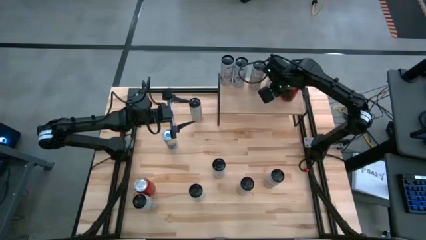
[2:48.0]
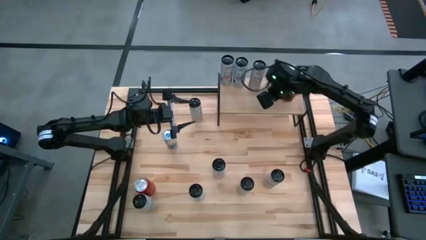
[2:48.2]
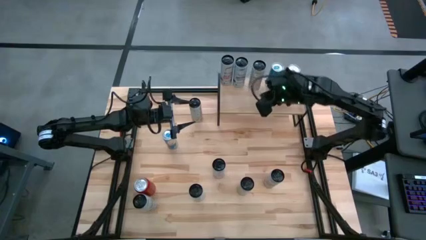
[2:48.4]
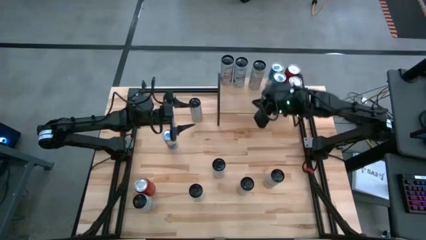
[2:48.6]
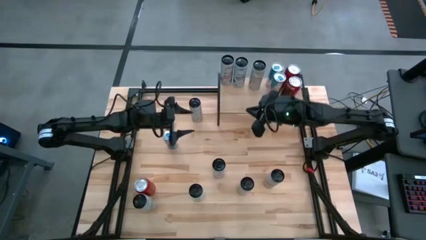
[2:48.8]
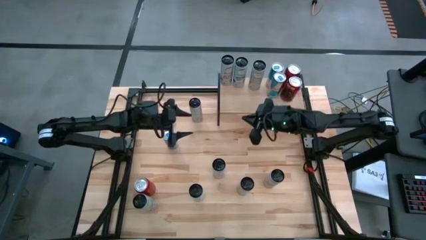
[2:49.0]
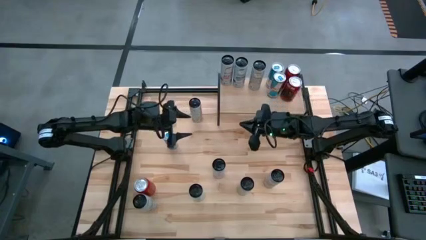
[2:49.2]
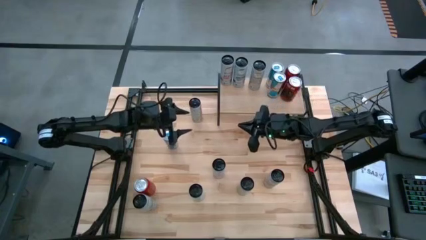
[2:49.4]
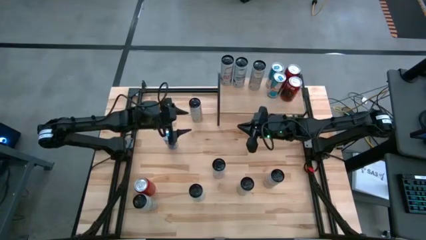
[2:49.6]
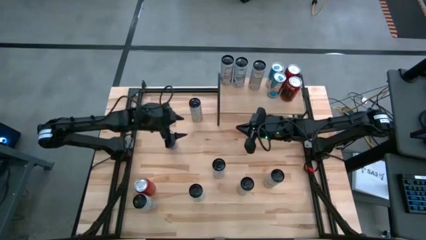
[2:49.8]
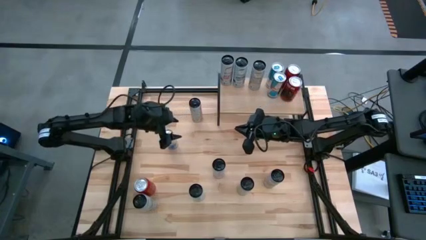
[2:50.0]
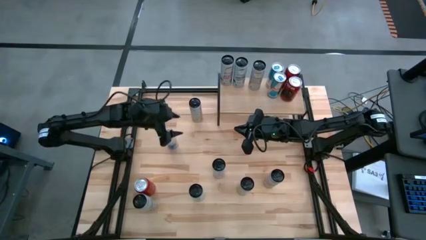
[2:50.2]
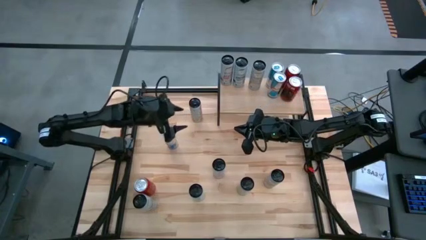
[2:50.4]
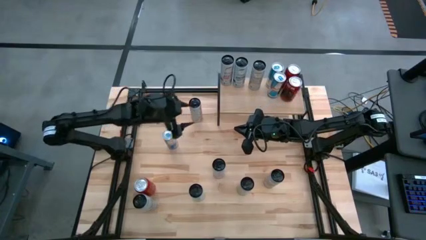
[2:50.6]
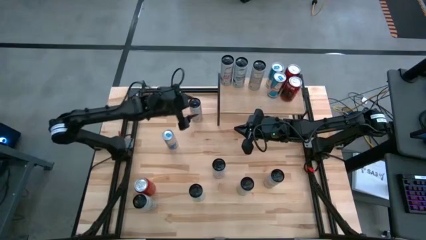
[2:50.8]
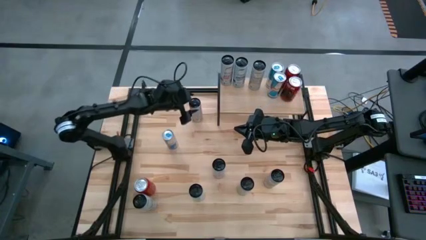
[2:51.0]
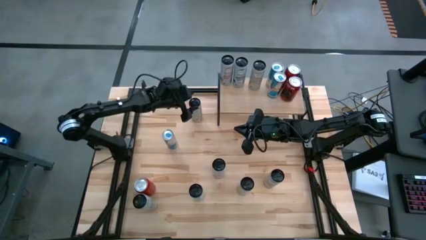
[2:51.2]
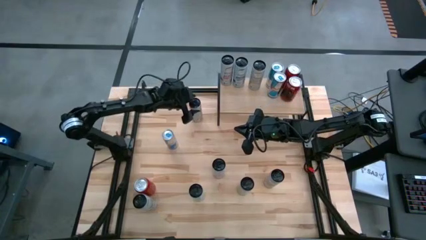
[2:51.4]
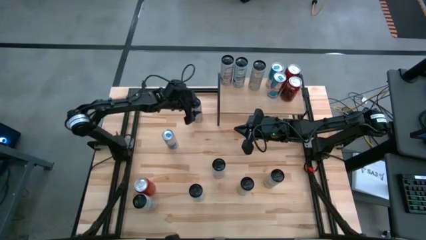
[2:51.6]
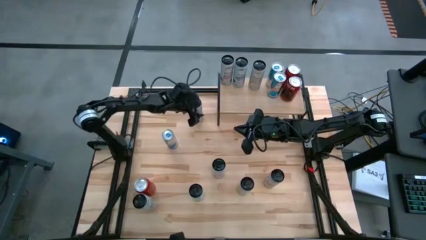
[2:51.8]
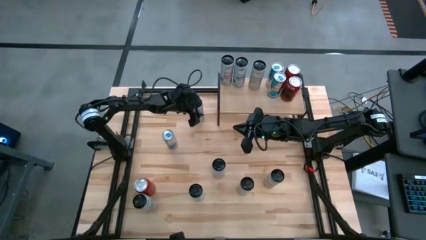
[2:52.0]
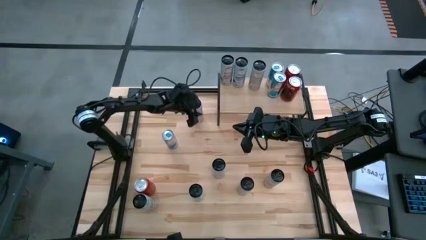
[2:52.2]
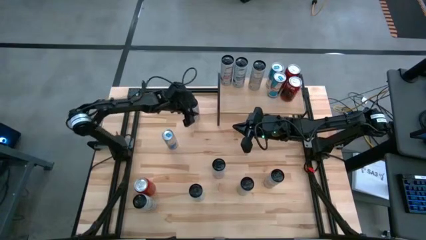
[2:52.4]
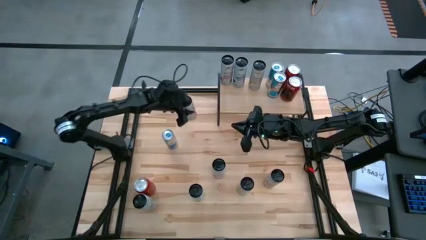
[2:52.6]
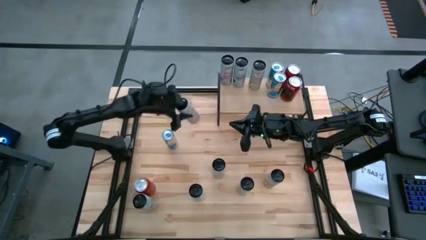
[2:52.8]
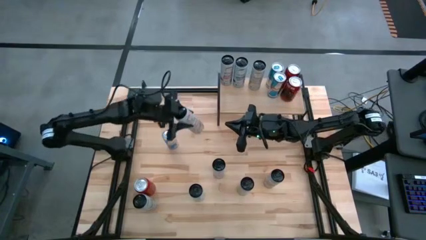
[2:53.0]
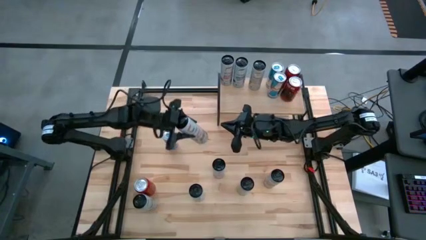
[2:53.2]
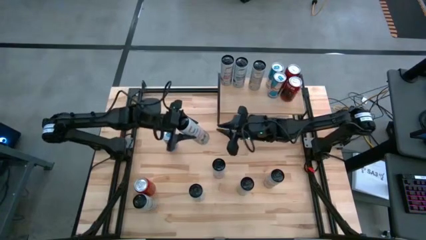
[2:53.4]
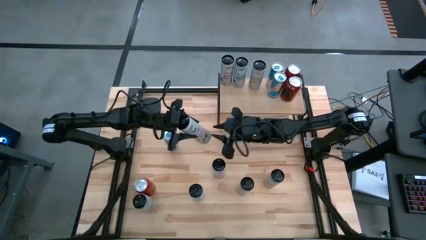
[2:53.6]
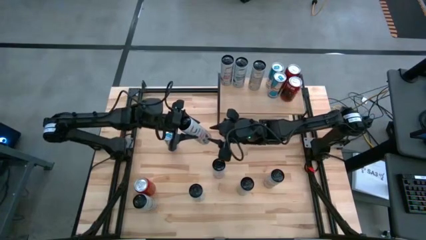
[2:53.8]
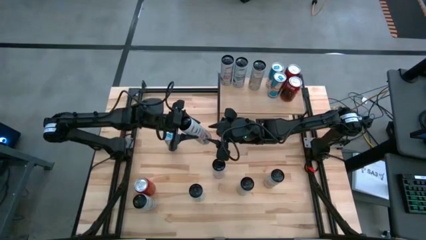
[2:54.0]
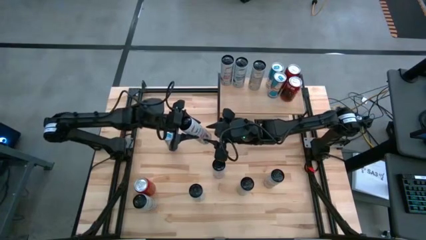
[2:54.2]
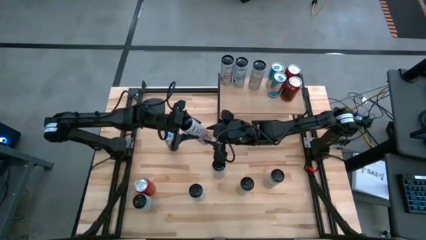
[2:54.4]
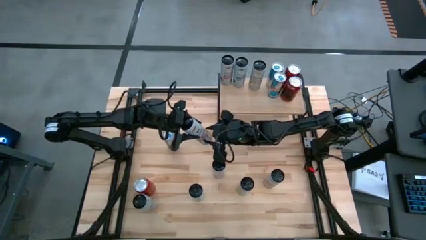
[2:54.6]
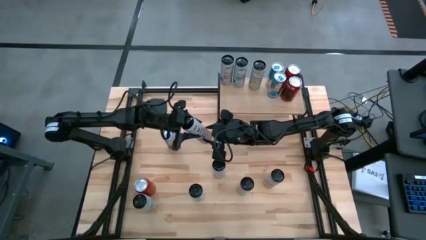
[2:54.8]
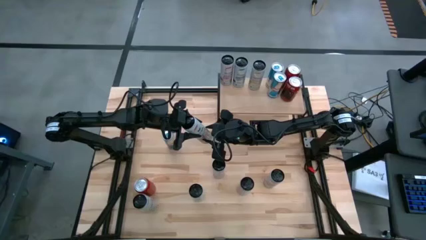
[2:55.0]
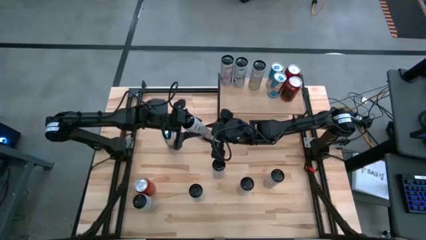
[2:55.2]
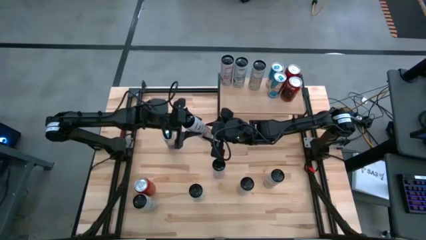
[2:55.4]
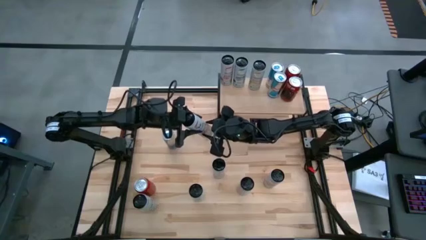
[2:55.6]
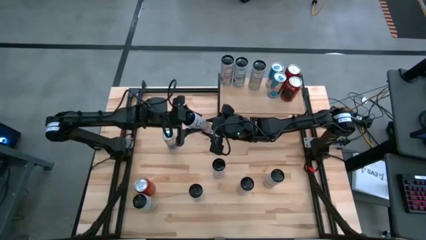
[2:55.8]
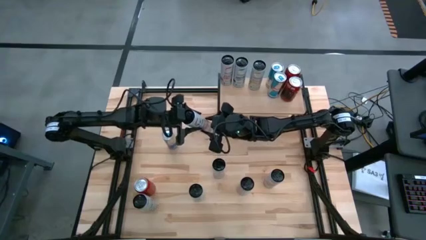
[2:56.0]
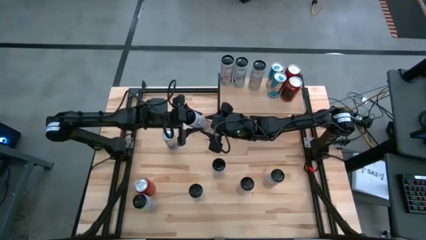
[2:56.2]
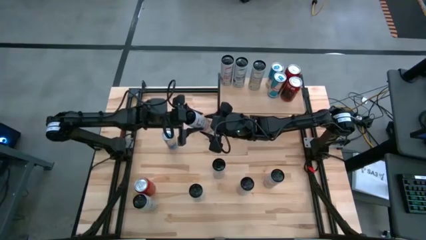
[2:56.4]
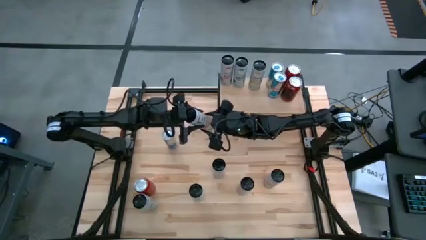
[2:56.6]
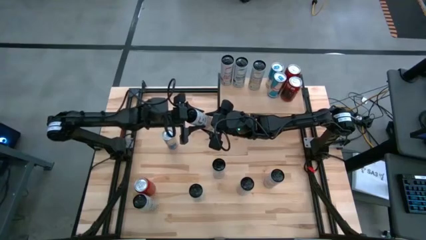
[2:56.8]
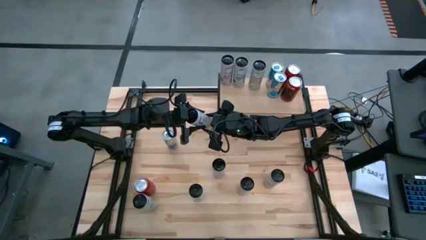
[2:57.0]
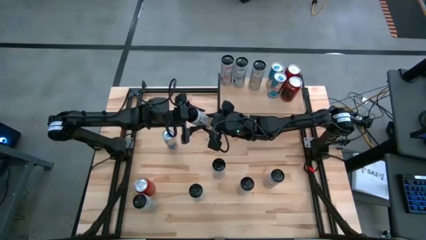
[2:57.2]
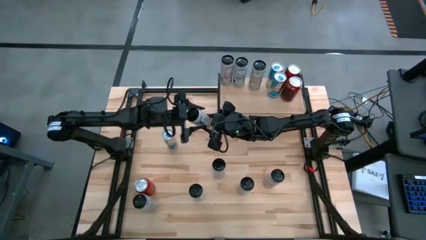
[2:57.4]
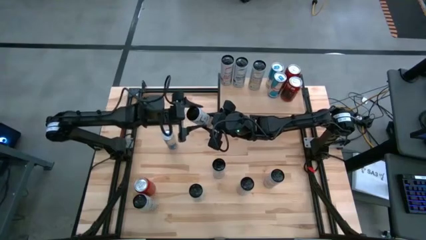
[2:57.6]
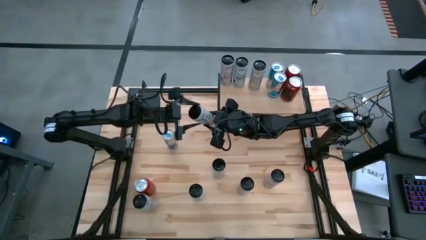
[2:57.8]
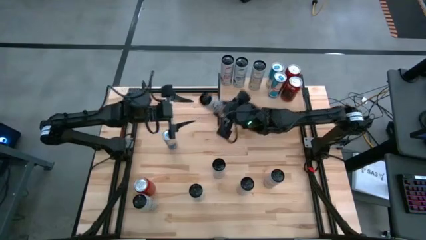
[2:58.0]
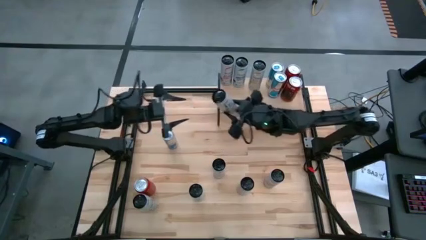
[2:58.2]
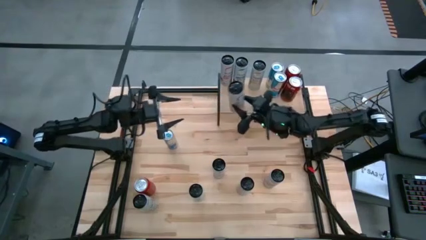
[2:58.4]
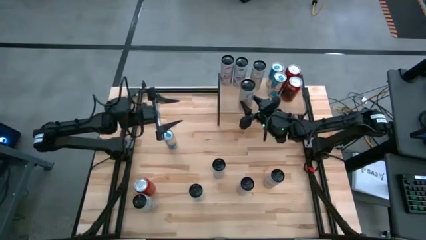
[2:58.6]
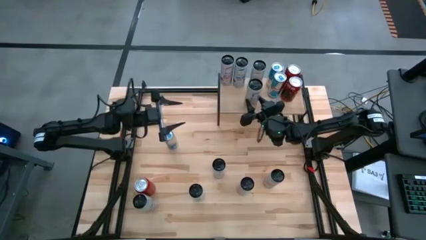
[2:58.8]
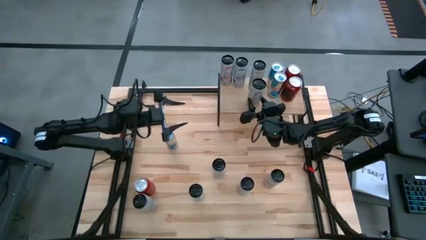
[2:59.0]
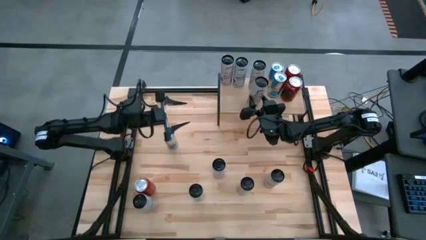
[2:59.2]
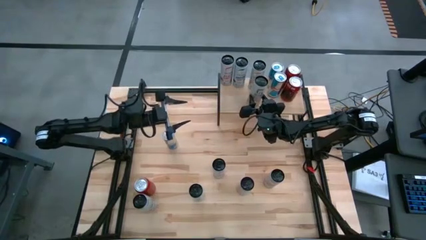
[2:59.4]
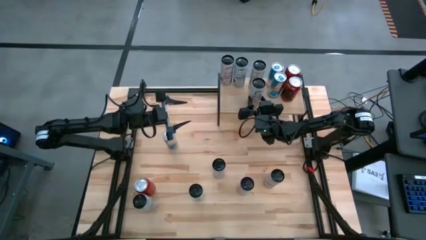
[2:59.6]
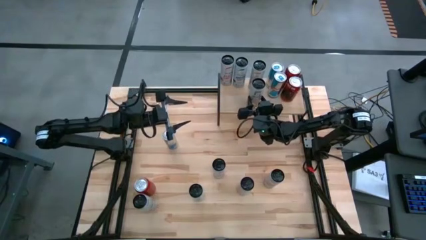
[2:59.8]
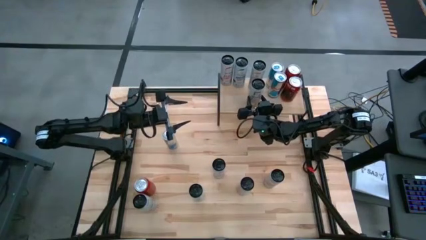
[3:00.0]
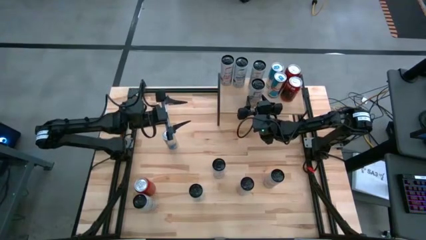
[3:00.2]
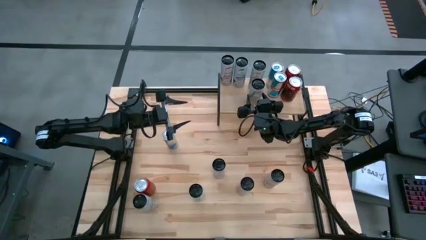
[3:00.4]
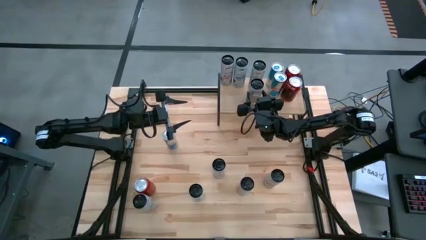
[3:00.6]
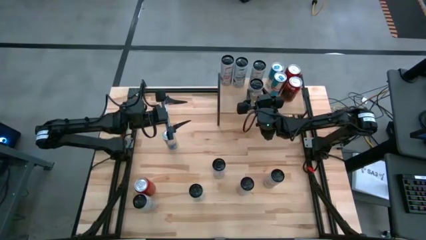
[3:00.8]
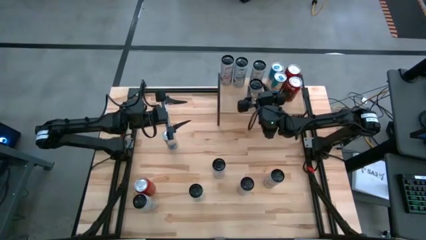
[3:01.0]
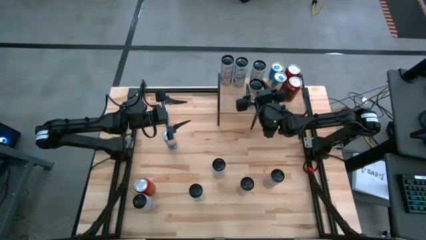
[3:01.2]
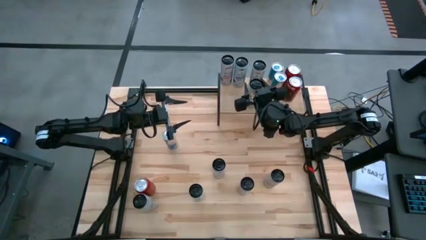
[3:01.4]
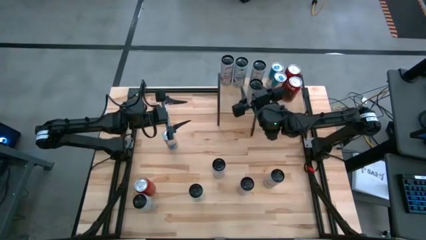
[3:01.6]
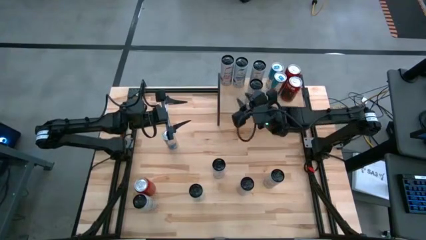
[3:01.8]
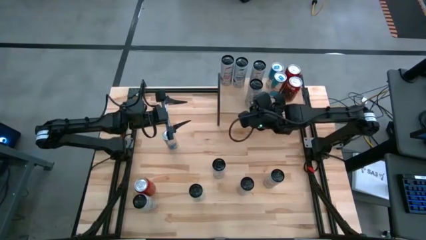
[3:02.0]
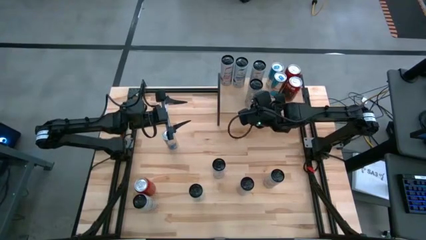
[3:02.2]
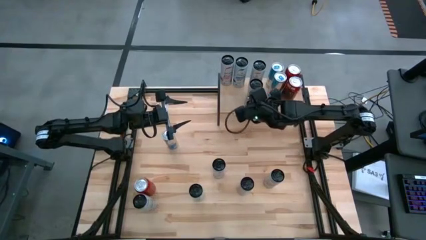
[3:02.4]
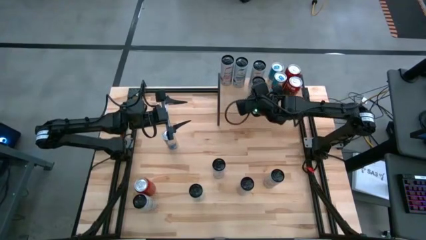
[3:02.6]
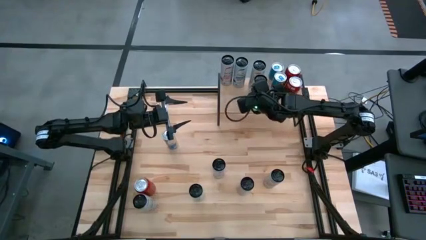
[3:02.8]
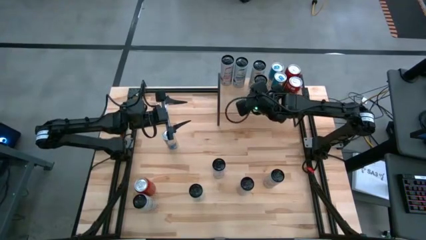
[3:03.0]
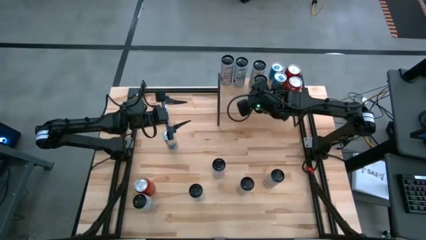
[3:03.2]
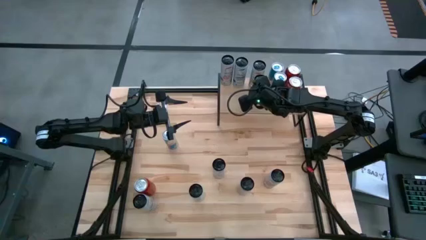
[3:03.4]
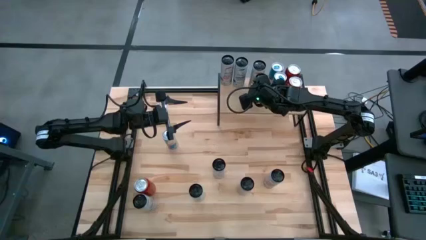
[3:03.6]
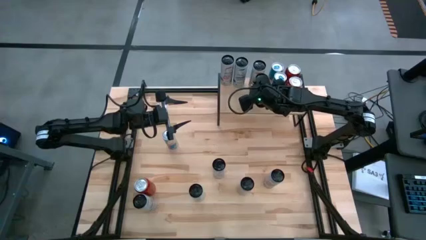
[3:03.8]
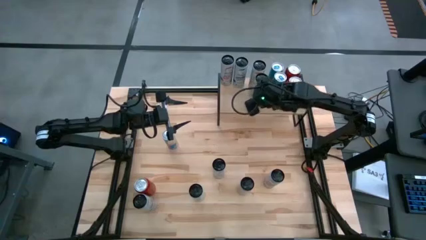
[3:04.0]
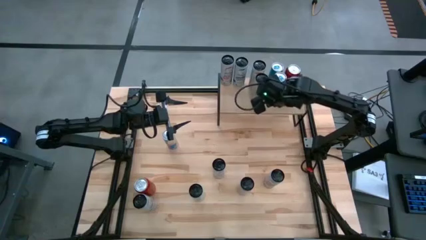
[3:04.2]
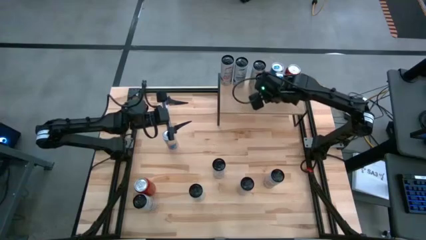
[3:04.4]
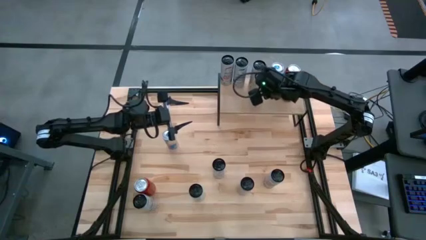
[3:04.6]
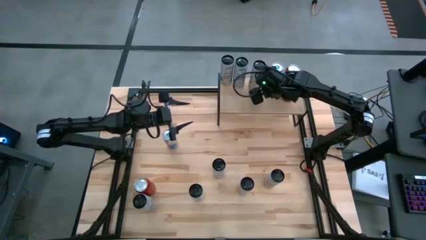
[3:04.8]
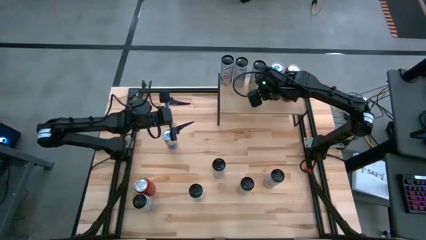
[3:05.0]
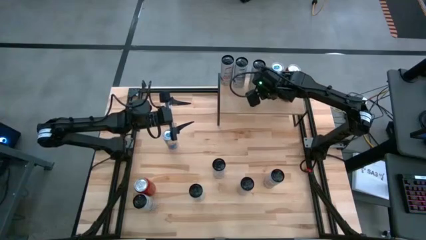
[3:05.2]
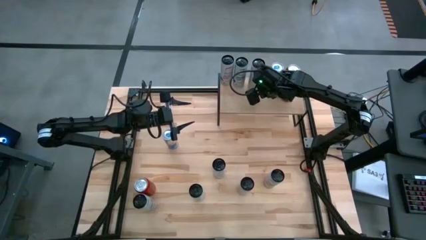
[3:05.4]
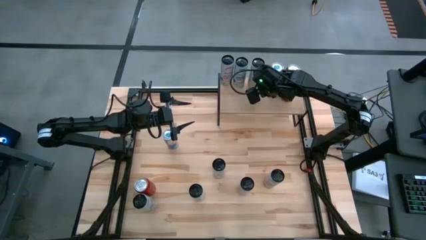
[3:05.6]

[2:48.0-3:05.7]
Task: Place canned beverage on shelf
Put the top white yellow soda can on the shelf aligned with the other white yellow soda can
